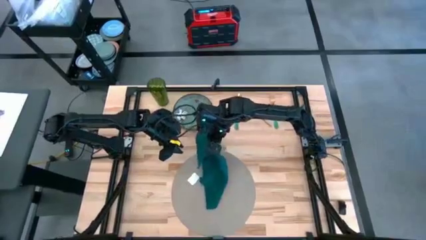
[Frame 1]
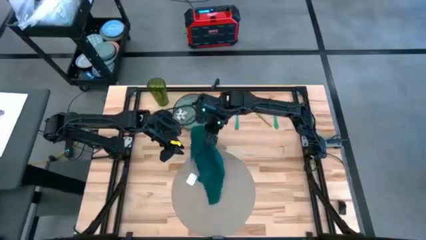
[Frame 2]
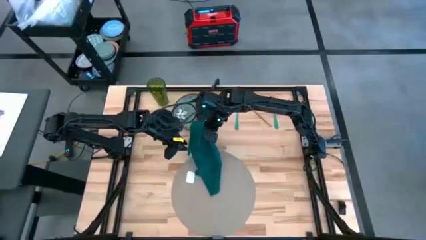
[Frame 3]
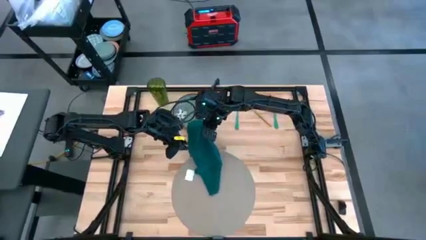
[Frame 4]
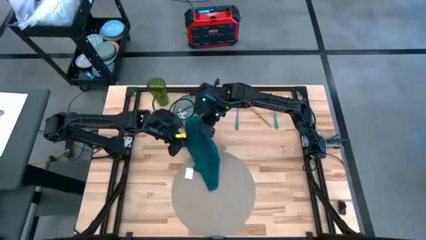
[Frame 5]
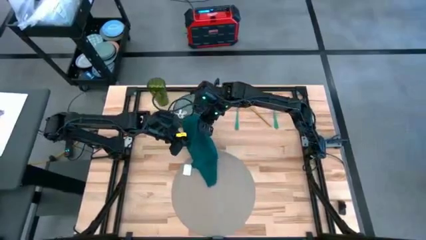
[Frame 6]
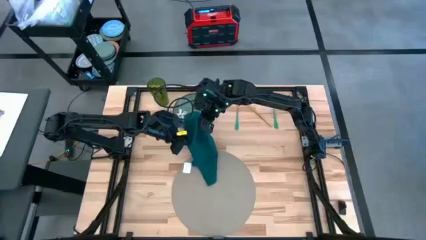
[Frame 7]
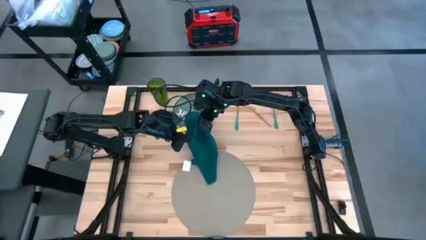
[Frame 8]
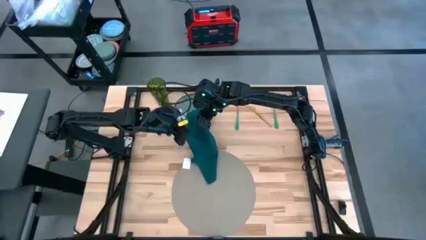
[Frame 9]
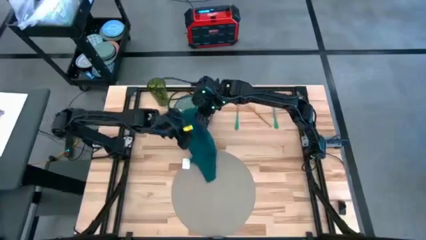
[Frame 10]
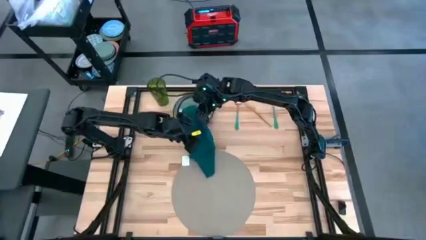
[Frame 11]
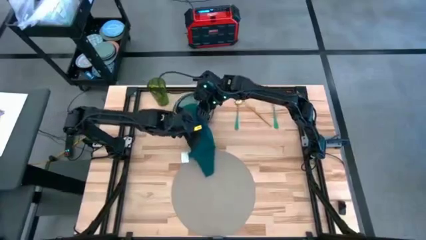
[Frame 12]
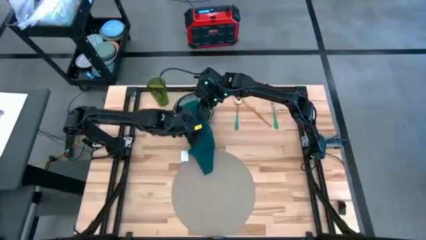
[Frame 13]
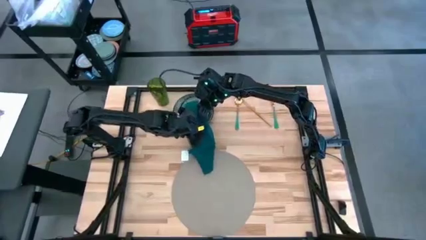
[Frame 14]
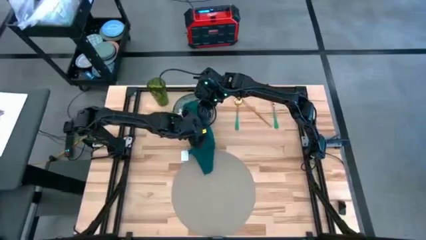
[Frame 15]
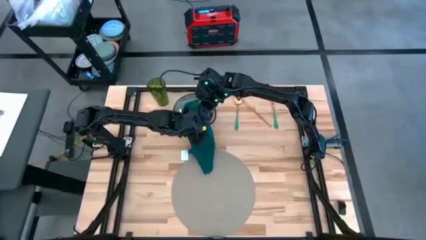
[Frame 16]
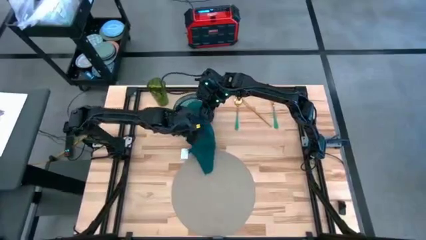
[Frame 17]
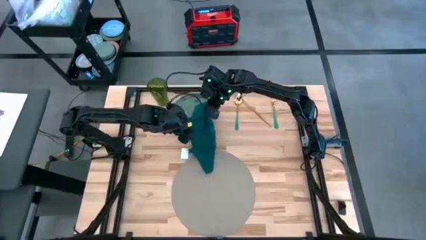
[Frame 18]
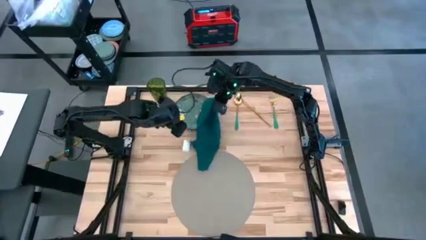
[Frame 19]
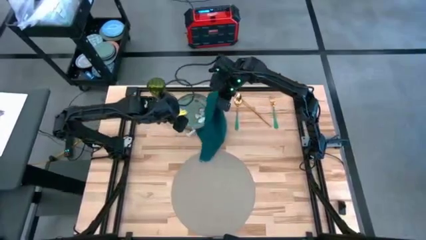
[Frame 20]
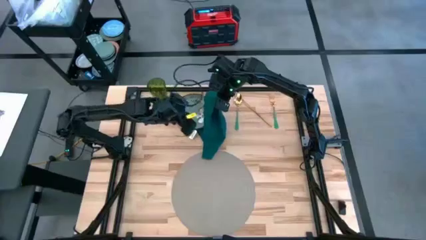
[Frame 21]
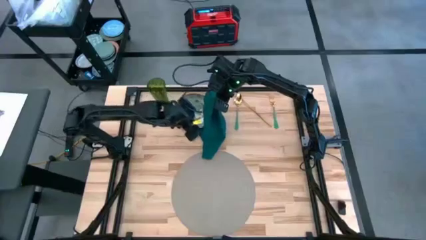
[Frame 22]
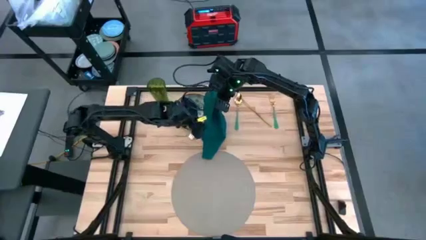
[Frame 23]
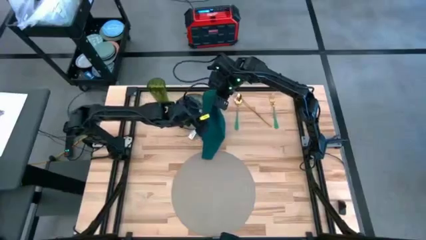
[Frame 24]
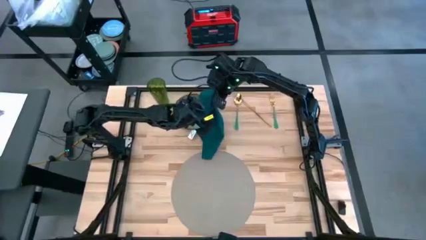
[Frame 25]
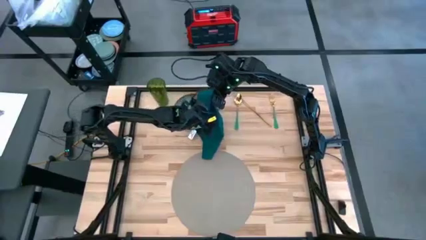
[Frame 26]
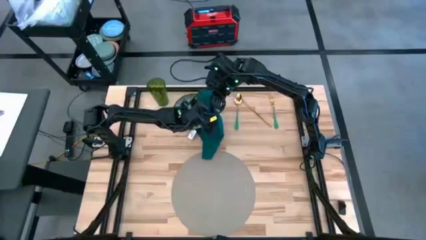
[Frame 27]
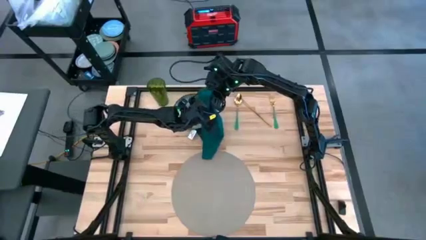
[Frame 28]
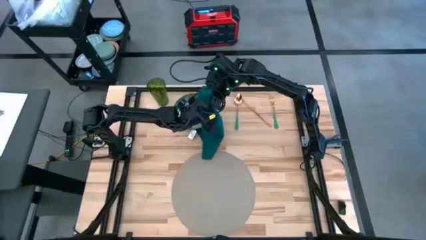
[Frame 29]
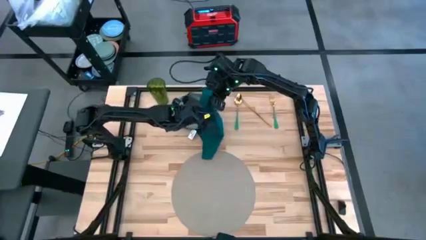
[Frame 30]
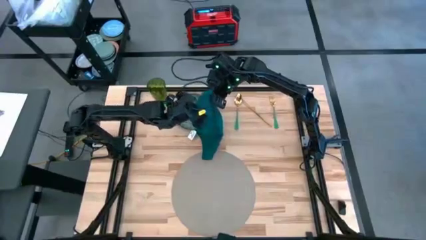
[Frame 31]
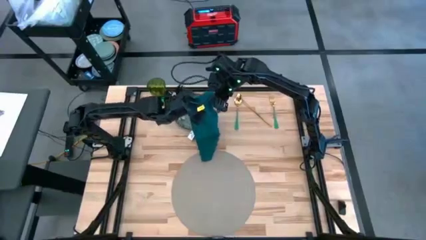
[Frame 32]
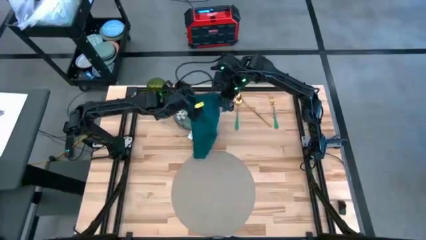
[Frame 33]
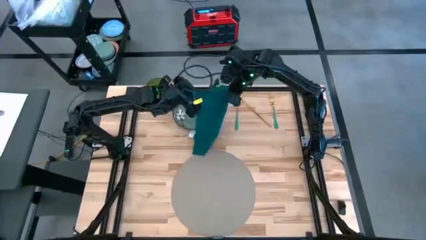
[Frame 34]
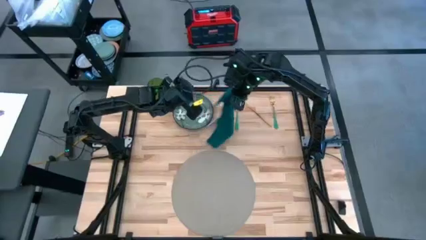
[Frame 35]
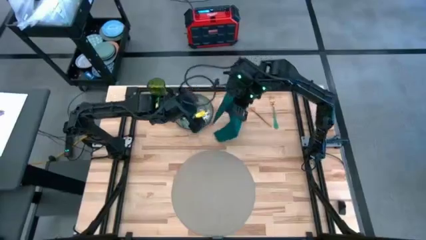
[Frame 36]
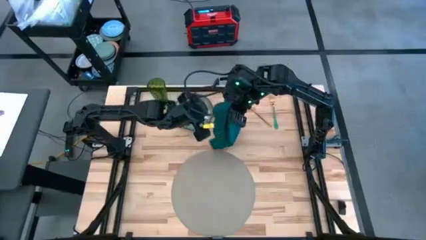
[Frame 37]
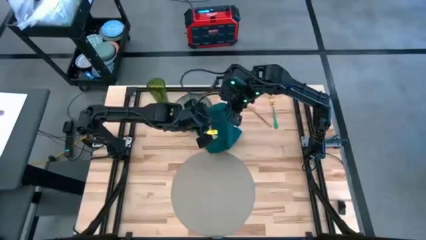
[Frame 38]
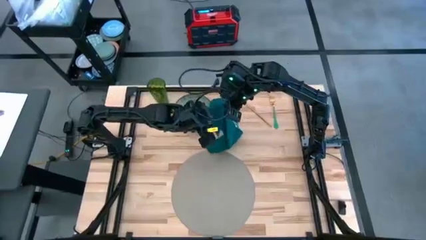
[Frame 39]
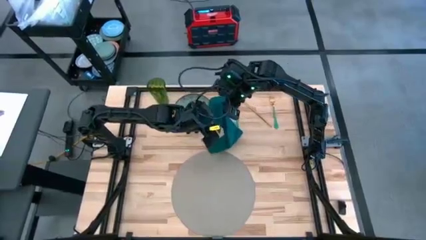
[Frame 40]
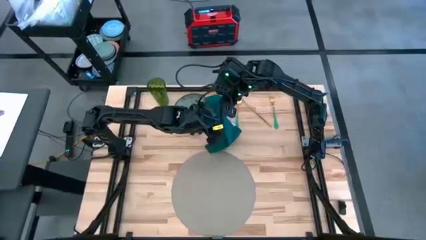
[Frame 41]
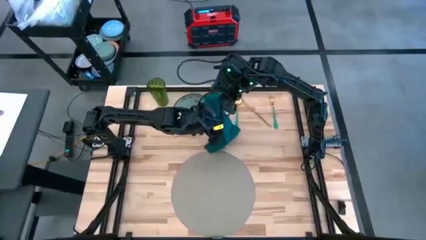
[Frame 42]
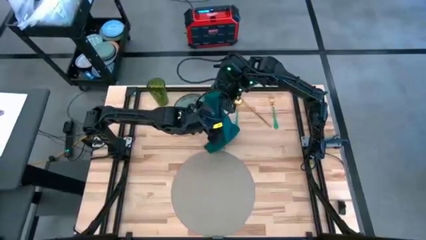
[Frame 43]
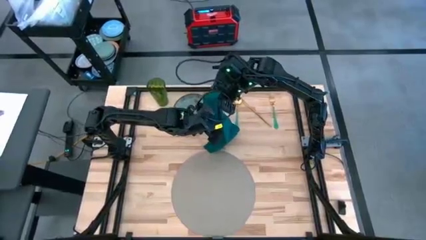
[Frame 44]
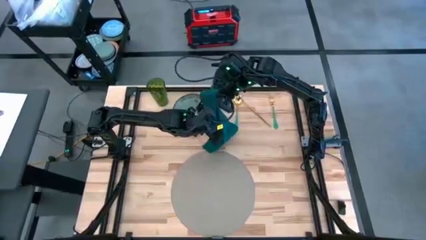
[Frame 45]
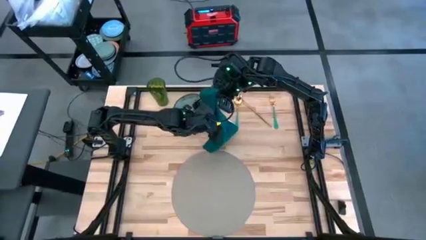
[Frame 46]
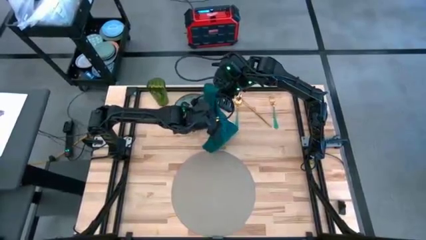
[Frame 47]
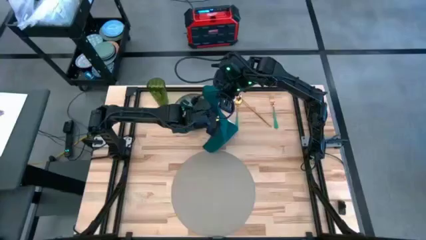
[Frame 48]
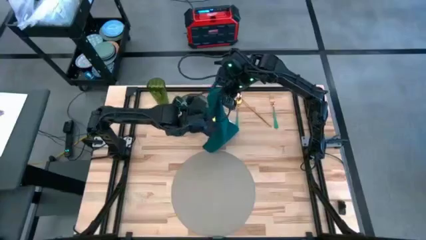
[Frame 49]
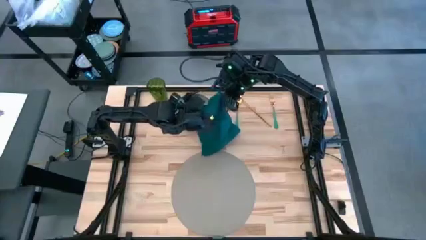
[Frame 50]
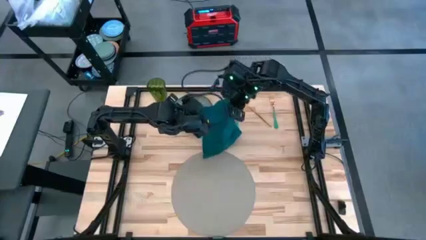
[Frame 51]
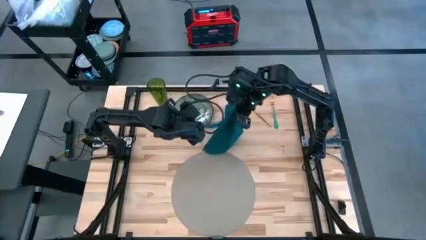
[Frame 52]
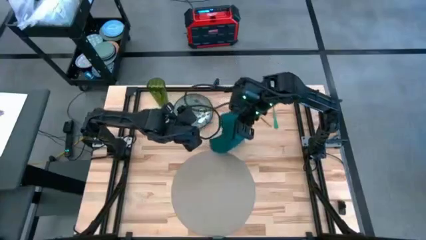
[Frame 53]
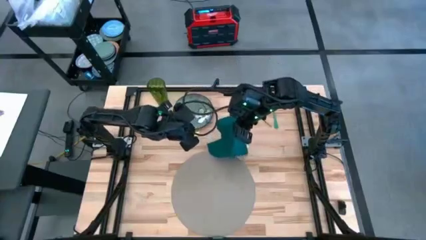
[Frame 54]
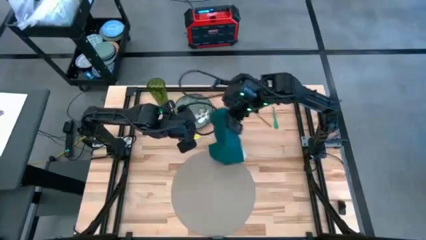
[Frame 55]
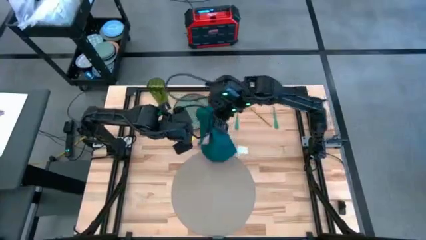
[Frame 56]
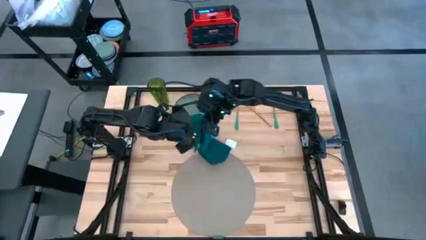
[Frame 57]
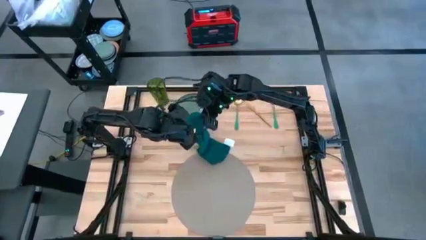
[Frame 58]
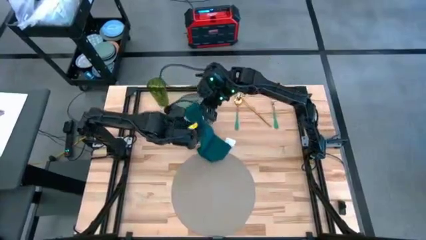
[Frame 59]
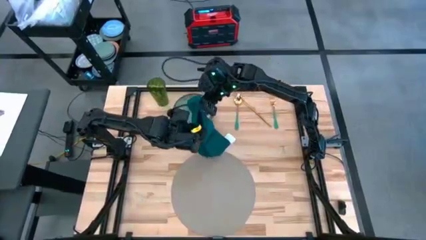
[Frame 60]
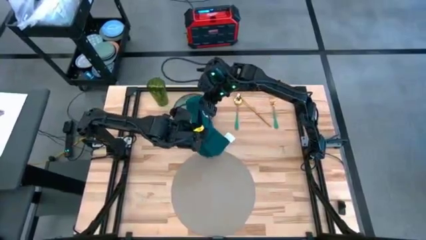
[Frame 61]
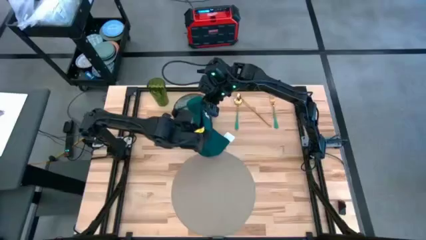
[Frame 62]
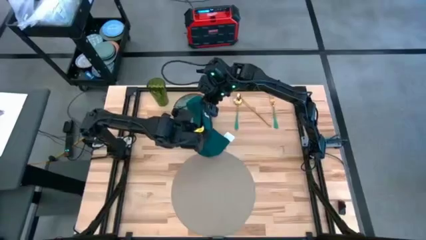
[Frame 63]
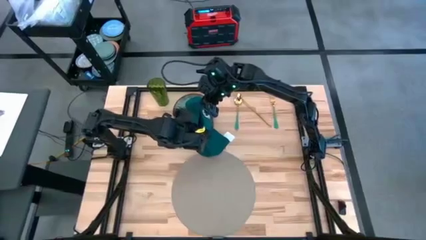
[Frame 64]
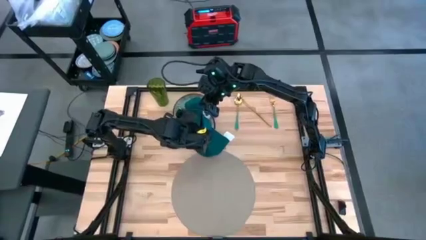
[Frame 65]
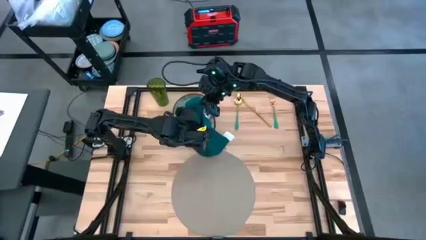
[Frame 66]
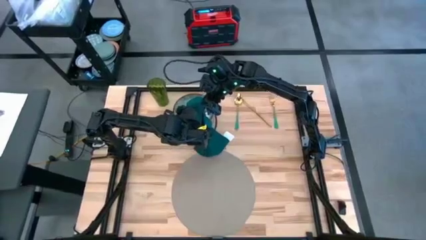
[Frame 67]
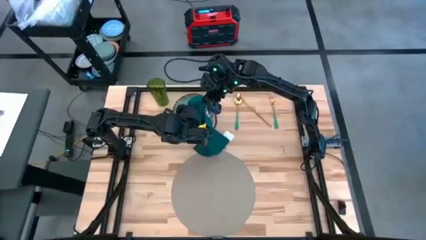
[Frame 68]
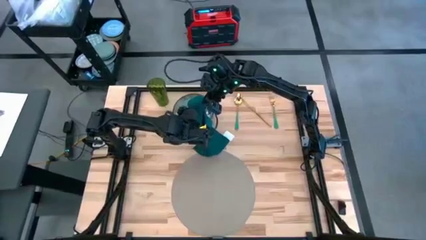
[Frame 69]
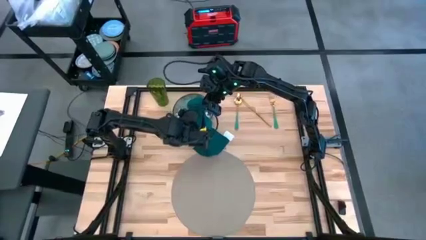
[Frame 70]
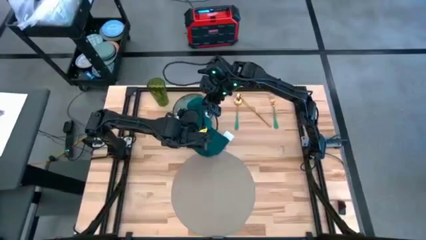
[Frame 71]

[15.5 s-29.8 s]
Task: Set table place
Fold the green napkin
